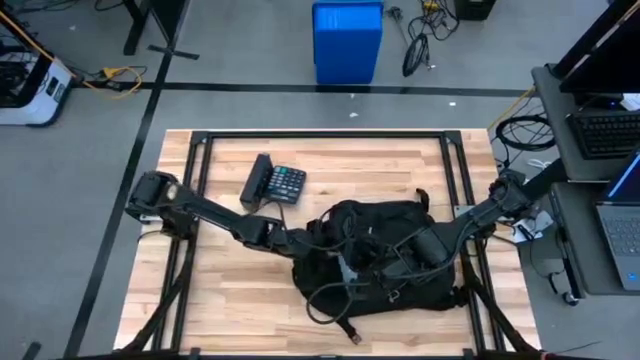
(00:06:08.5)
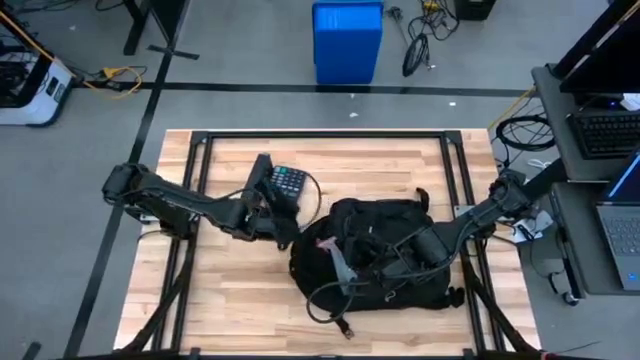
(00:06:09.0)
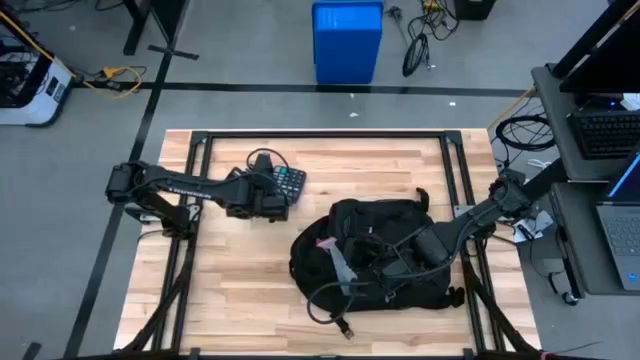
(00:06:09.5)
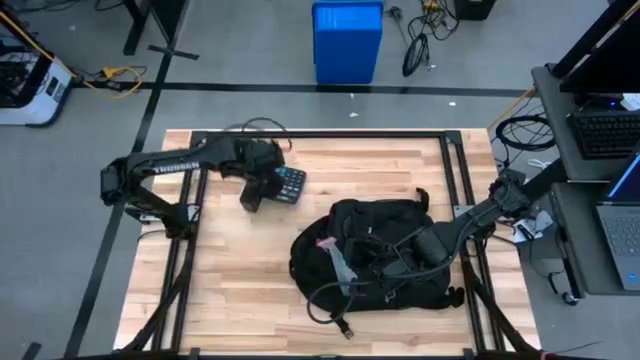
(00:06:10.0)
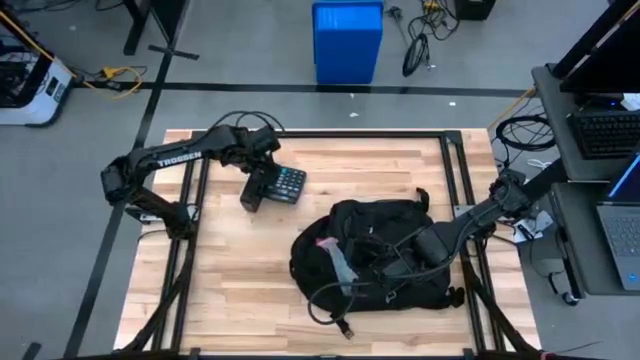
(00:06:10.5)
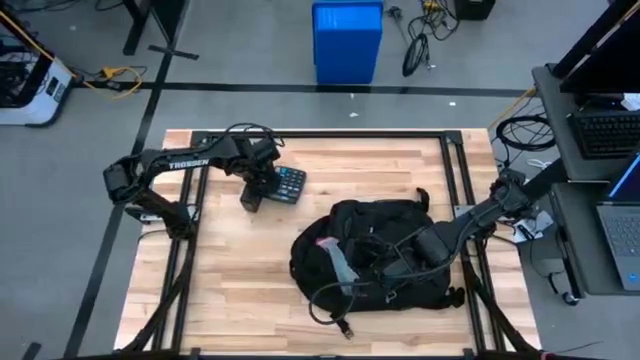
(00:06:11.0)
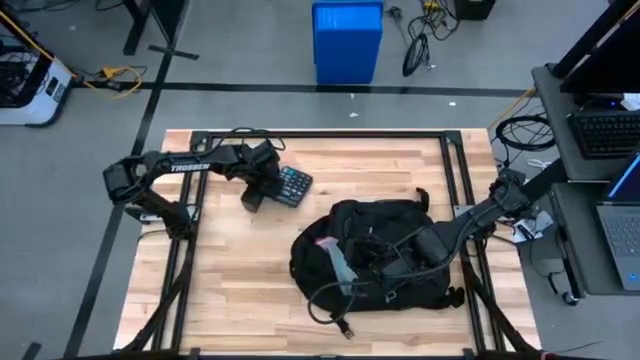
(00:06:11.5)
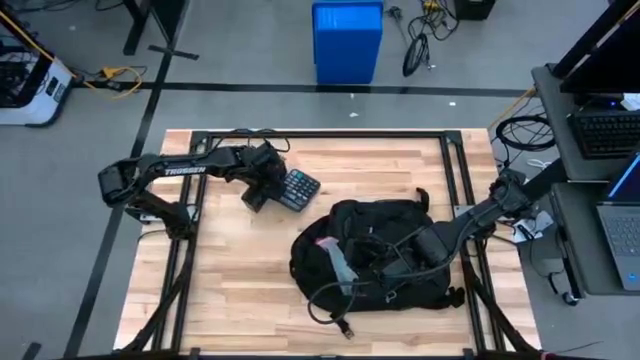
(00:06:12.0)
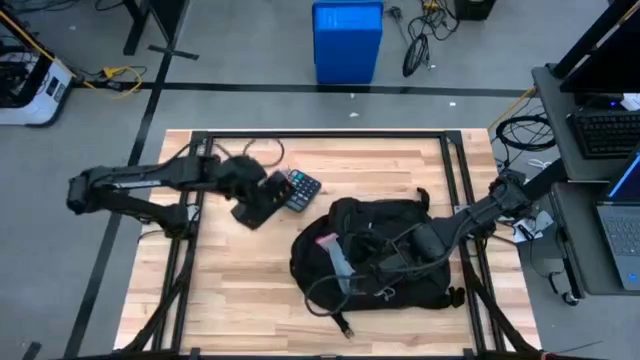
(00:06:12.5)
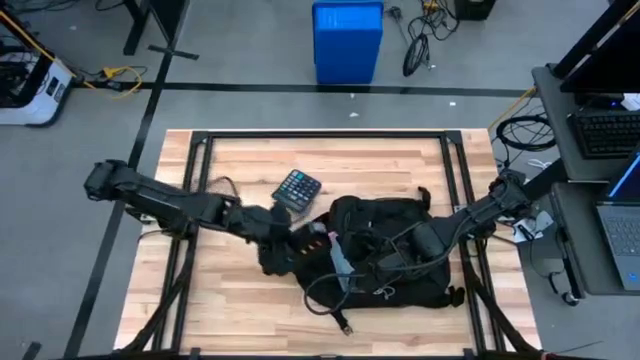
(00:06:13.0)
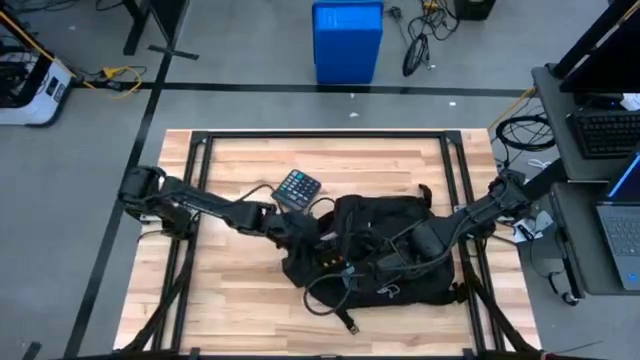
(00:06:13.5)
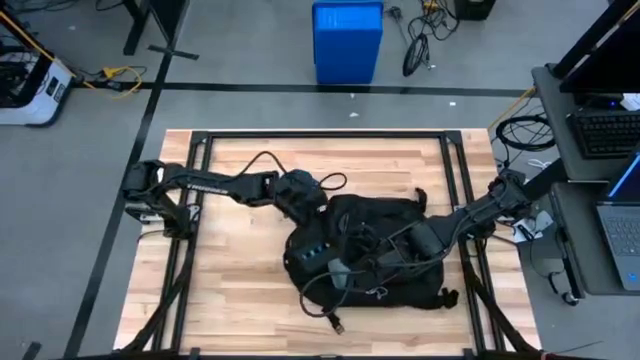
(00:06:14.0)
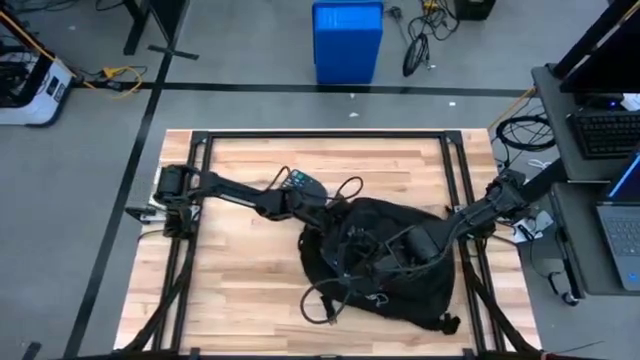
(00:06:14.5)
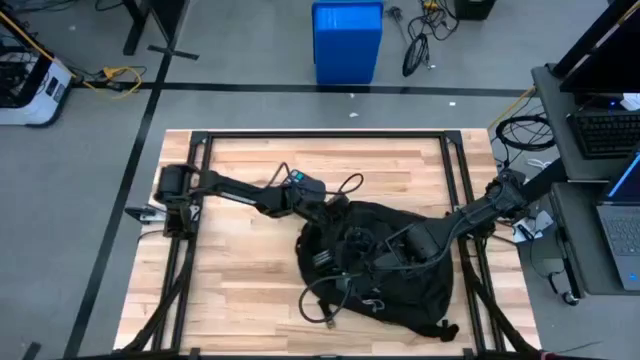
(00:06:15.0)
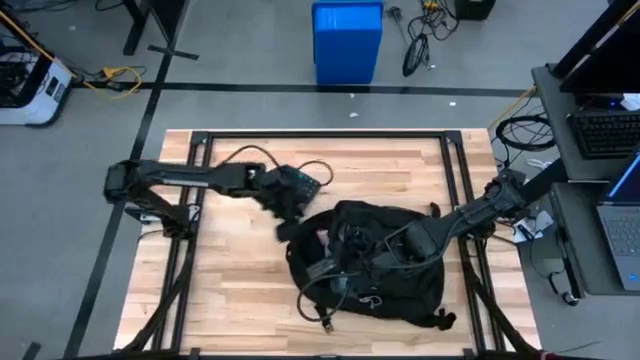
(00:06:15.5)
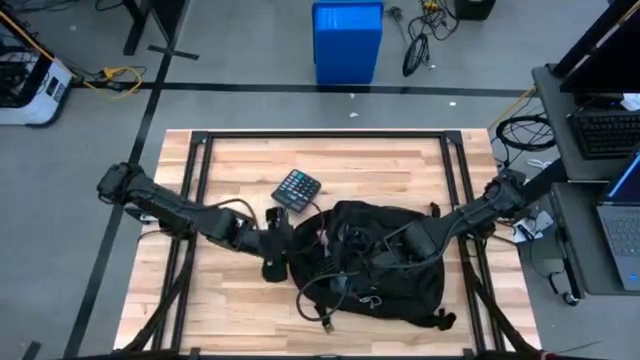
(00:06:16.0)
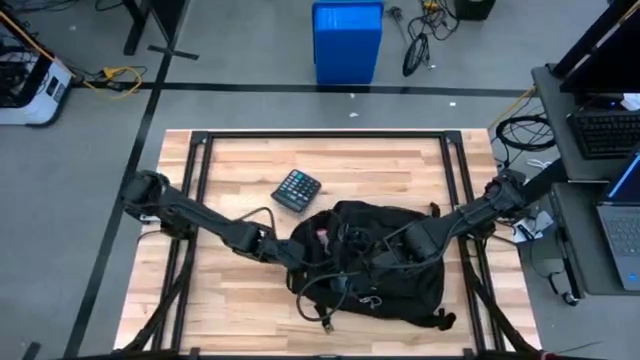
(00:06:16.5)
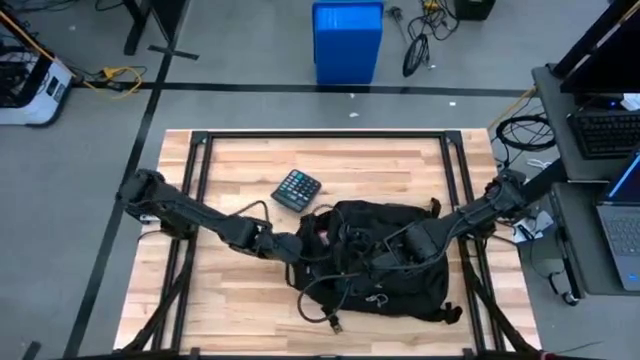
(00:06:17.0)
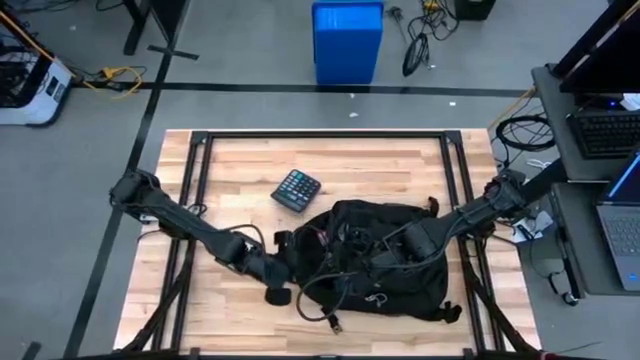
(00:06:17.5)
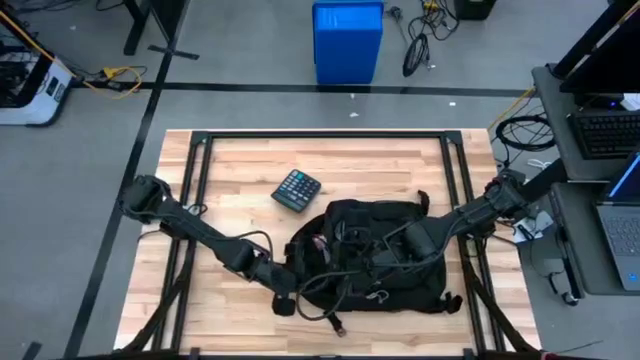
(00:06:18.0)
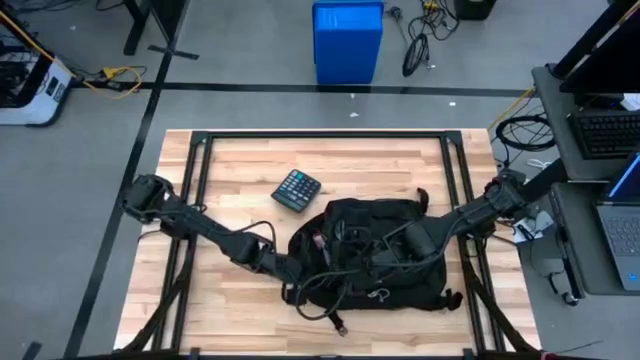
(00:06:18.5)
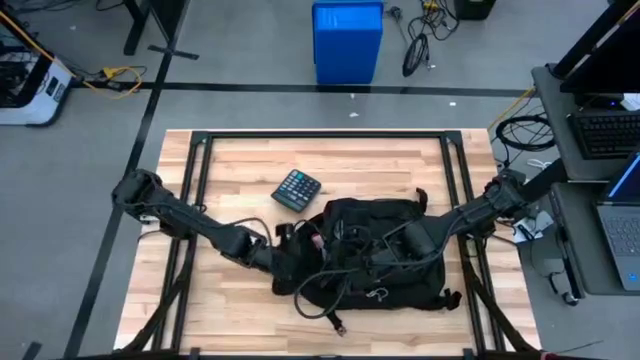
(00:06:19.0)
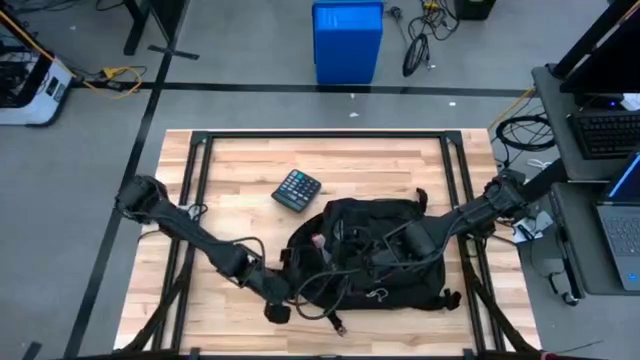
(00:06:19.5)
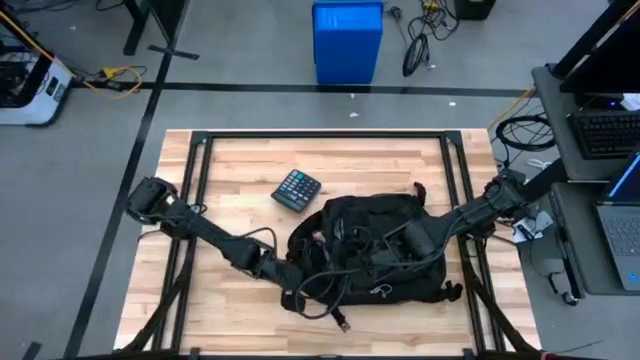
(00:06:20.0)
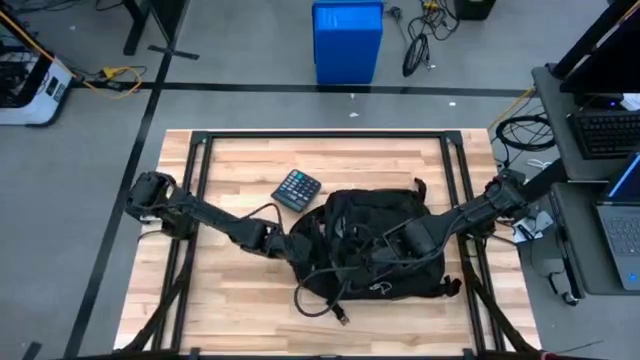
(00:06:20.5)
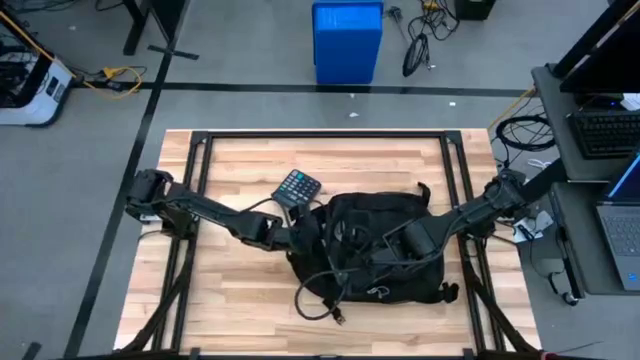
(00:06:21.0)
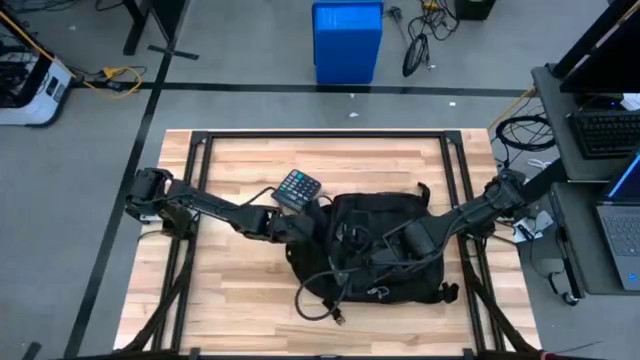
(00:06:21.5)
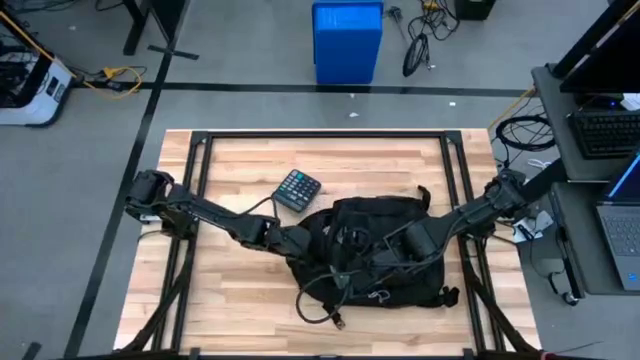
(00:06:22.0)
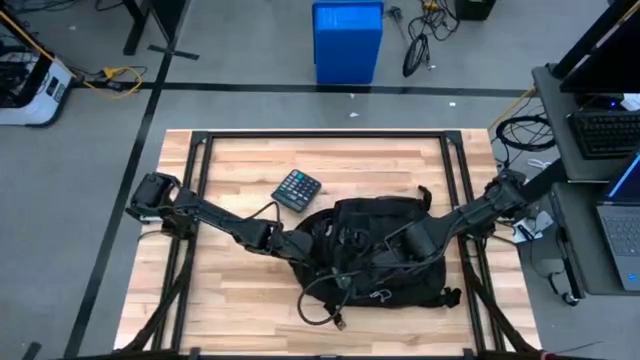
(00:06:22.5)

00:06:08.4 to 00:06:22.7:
Task: Unpack backpack
Put the black medicine organizer into the black backpack

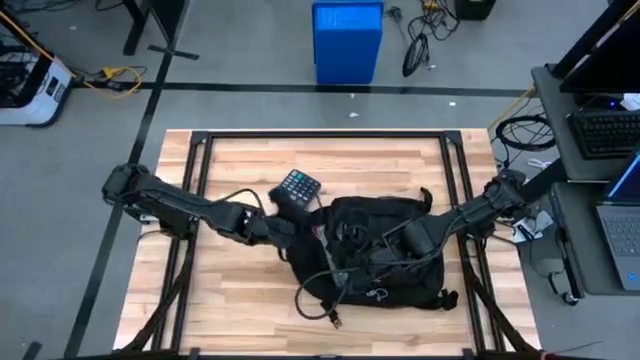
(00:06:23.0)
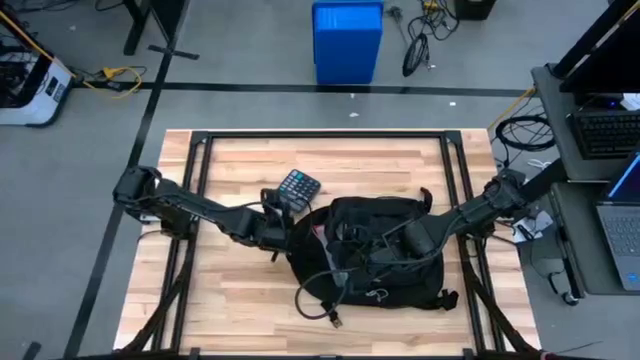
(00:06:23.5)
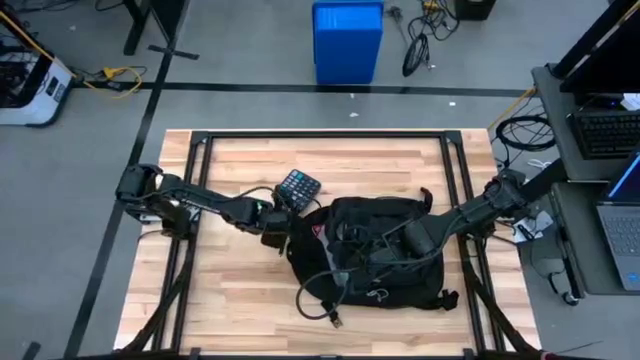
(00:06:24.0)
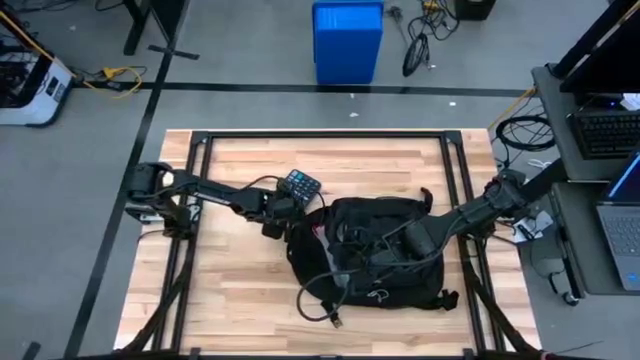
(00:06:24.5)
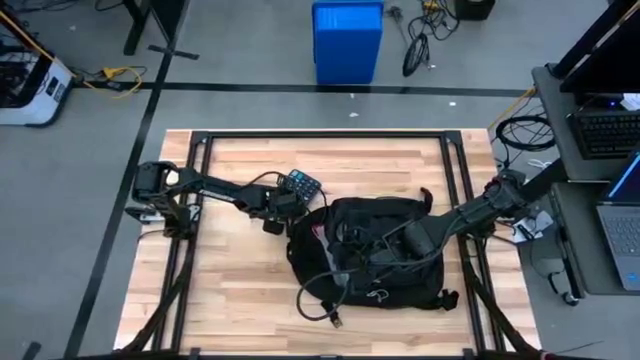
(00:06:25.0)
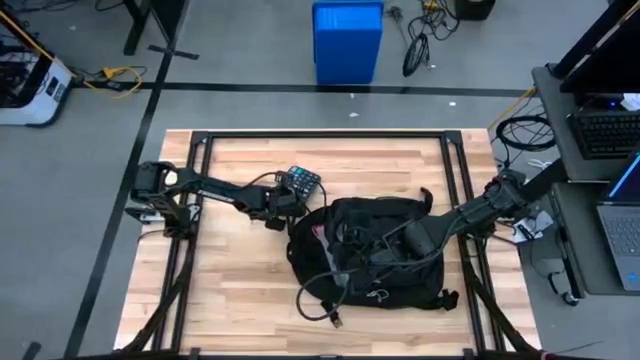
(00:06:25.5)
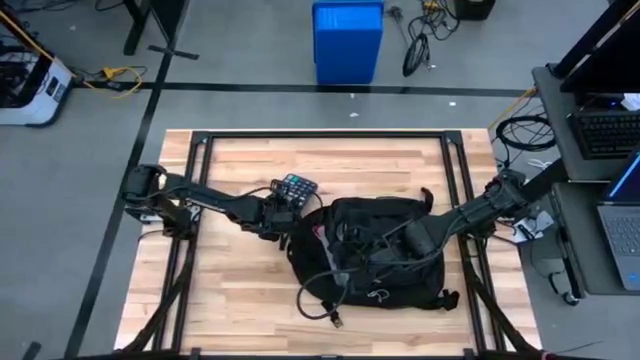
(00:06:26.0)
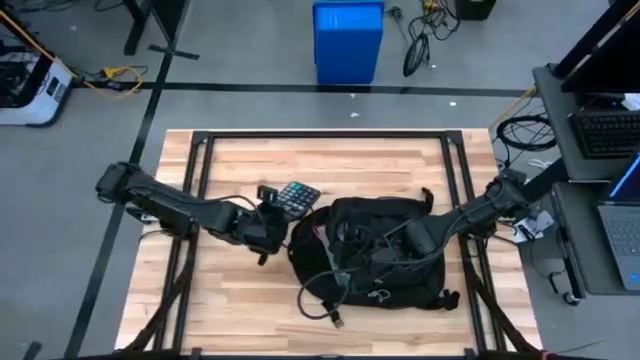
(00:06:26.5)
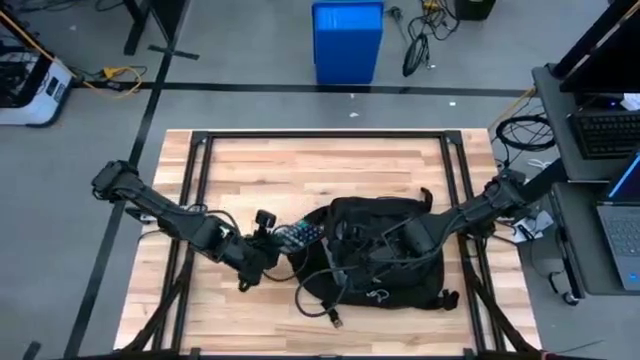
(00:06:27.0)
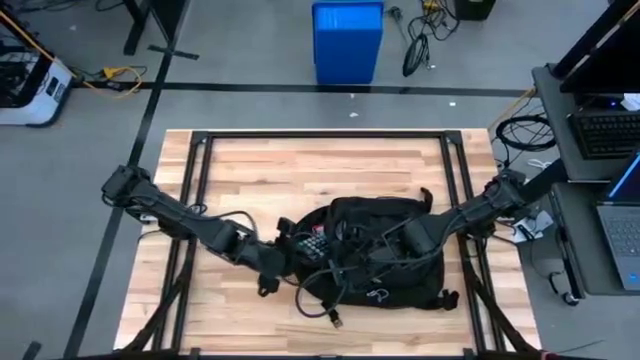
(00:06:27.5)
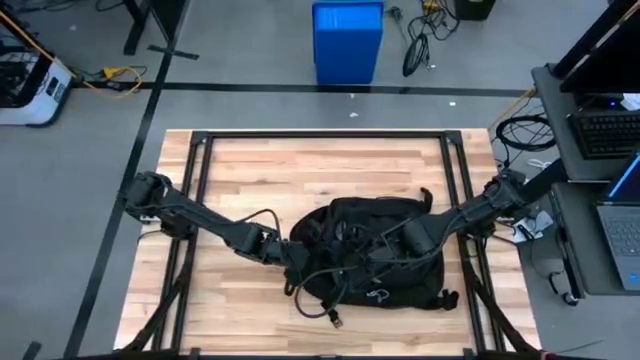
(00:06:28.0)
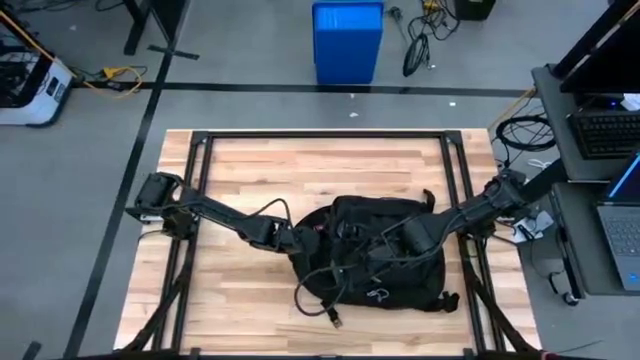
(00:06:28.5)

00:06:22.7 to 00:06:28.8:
Put the black calculator into the black backpack

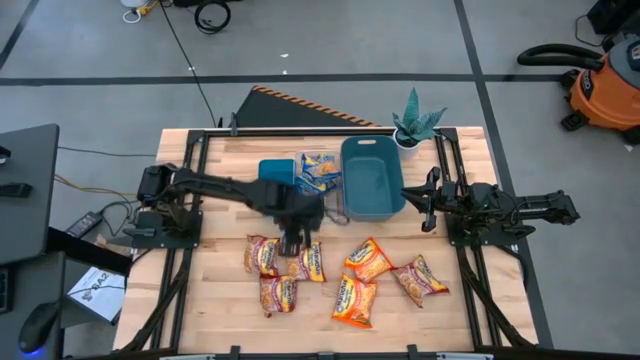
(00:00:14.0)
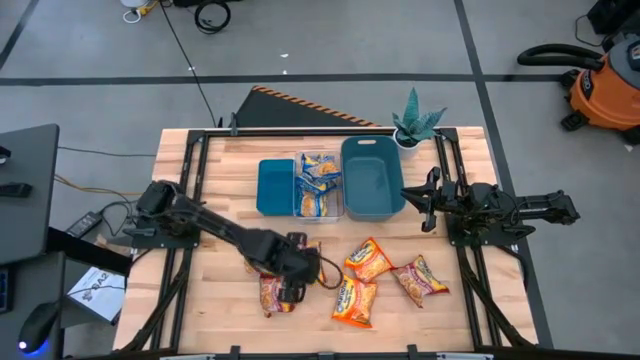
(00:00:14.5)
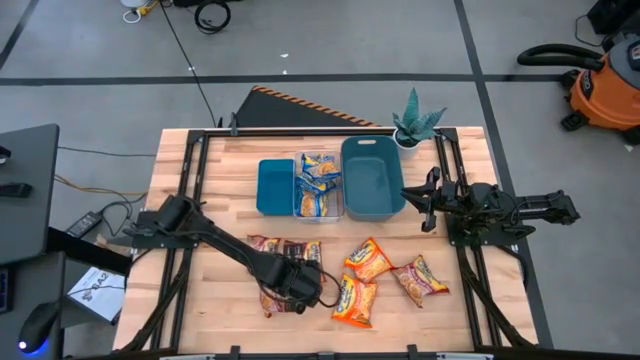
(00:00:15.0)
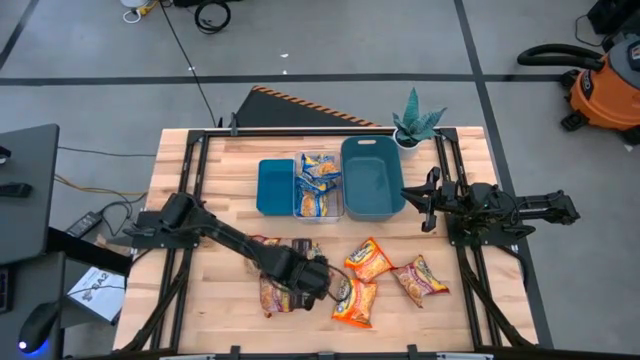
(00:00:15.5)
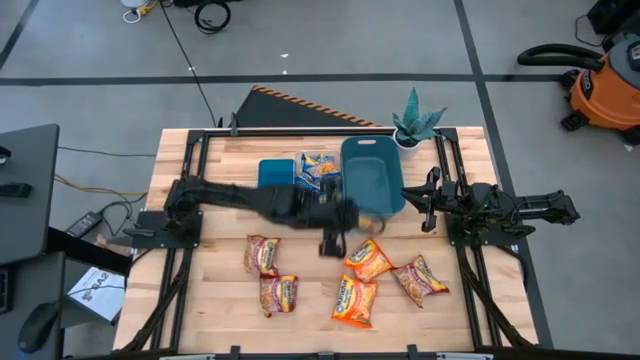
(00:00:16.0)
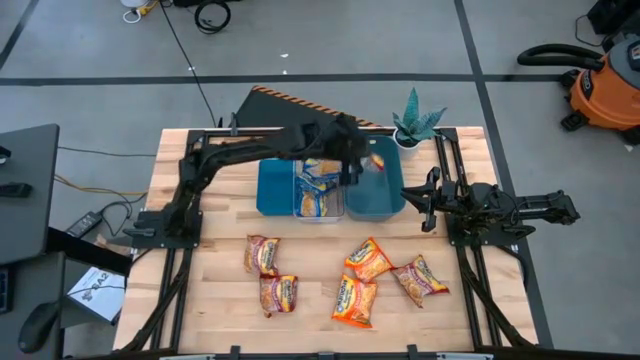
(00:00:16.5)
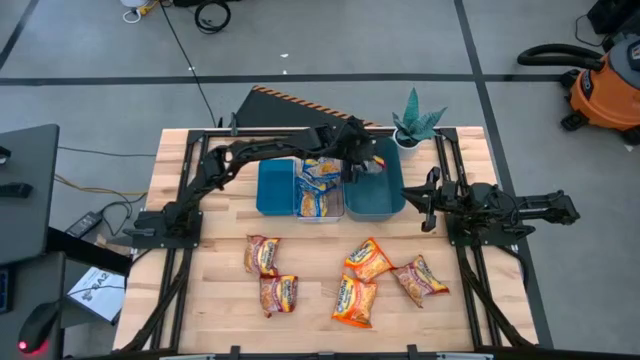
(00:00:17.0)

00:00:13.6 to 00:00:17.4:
Task: Sort Maruchan noodles
Put the right red noodle into the green bin
